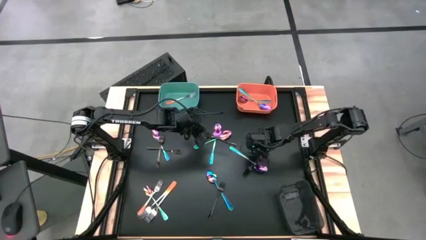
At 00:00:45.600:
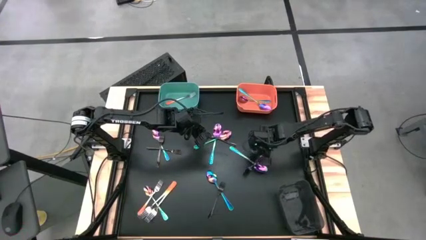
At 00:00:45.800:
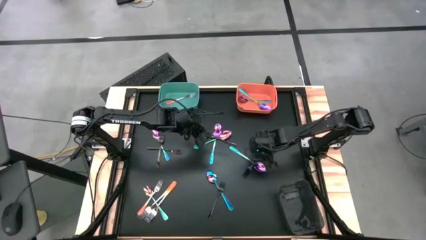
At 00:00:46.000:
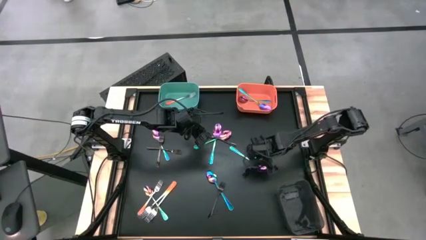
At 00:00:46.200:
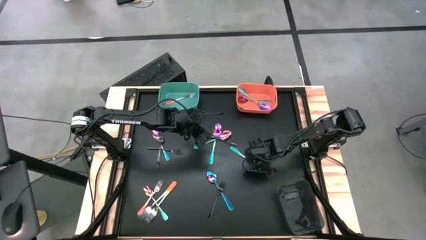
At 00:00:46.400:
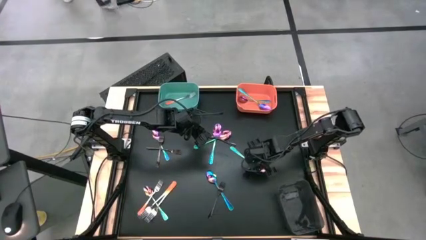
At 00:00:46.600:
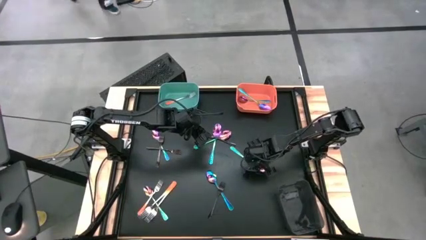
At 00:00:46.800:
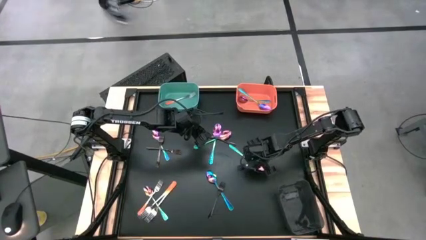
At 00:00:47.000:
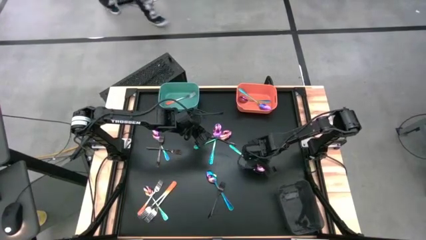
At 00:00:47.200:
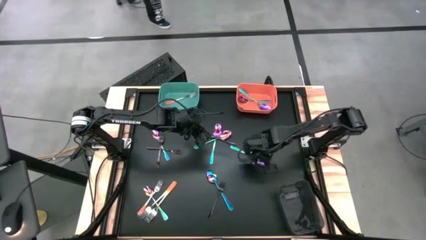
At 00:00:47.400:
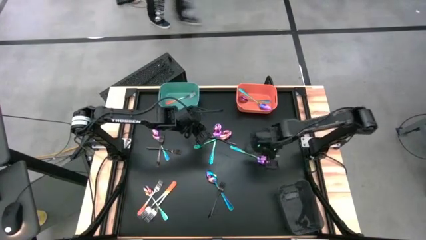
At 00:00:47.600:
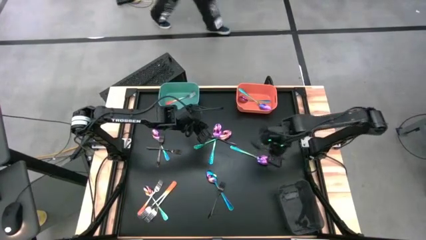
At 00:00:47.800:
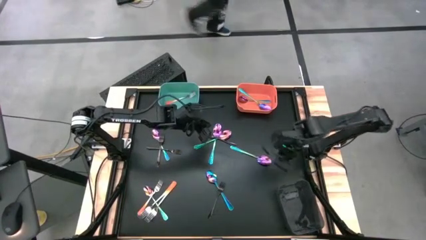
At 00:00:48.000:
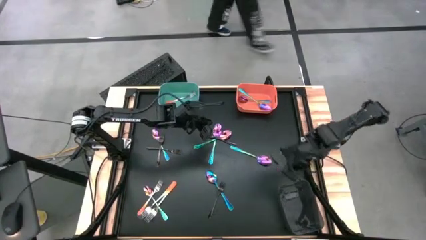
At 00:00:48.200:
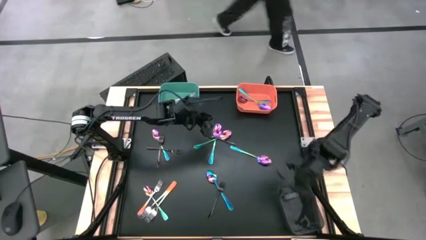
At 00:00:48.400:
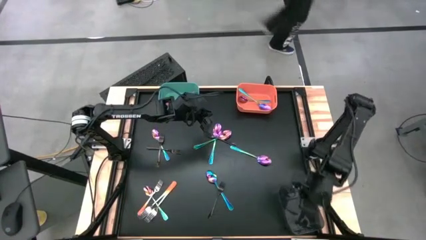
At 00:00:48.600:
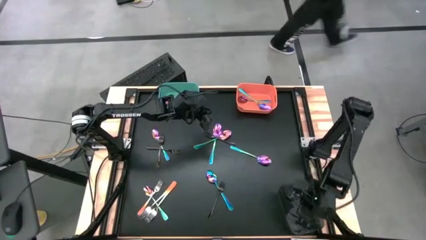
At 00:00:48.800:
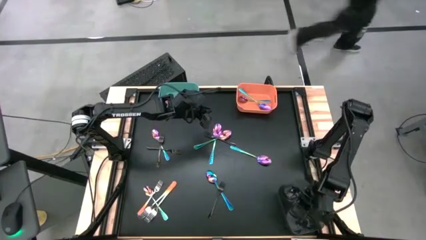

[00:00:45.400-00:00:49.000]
Task: Sort silverware by color (type)
Put the black fork into the black bin

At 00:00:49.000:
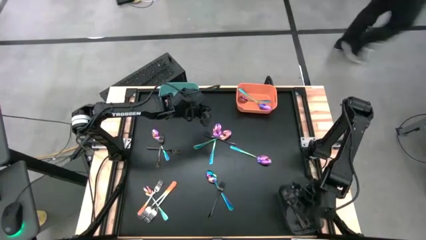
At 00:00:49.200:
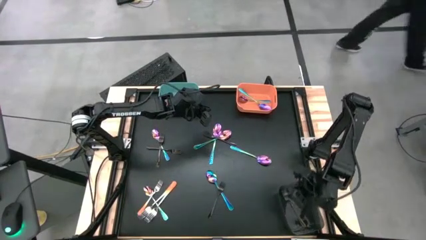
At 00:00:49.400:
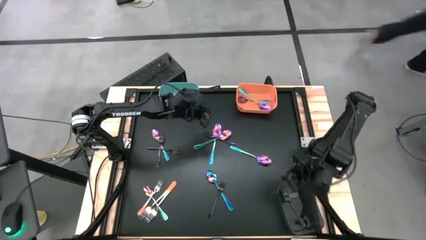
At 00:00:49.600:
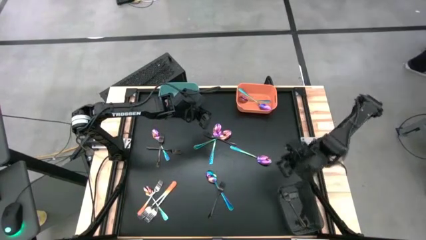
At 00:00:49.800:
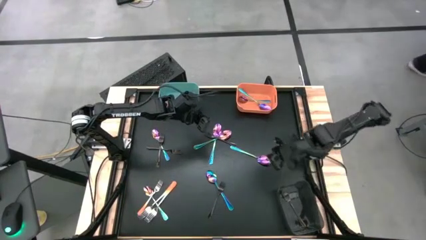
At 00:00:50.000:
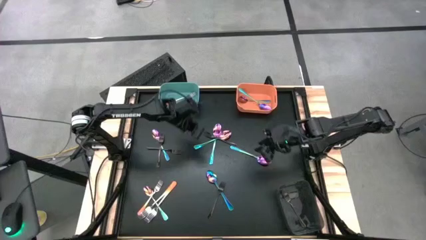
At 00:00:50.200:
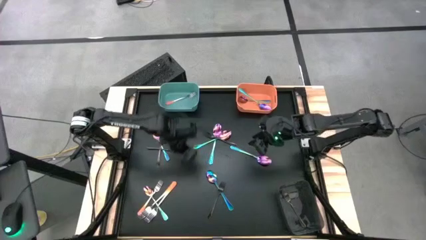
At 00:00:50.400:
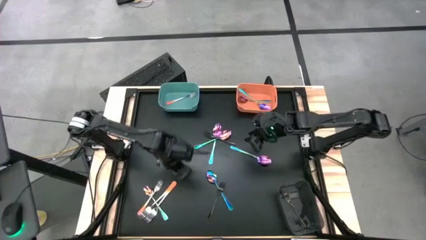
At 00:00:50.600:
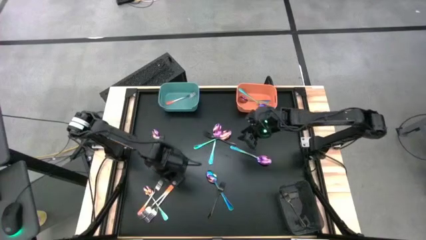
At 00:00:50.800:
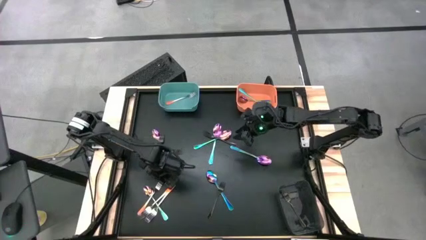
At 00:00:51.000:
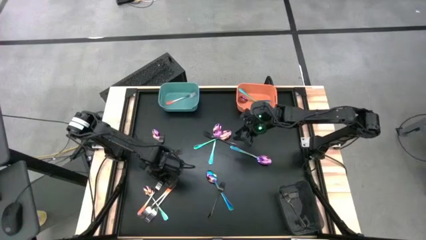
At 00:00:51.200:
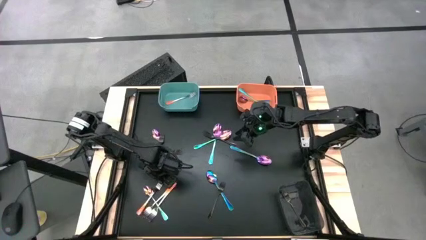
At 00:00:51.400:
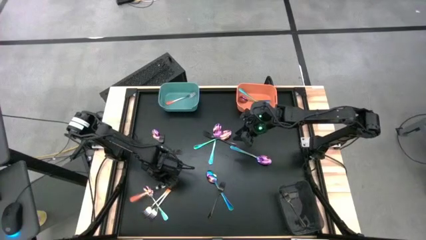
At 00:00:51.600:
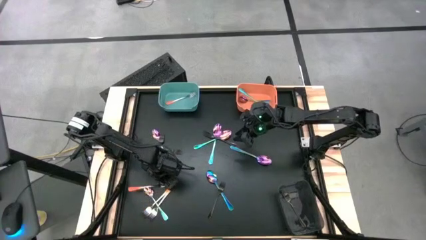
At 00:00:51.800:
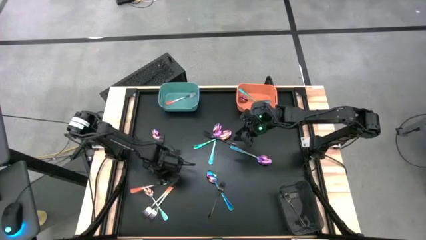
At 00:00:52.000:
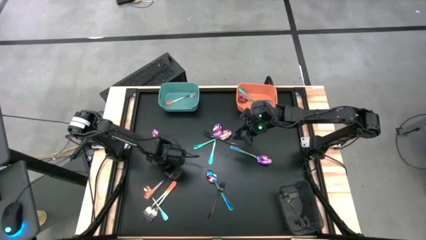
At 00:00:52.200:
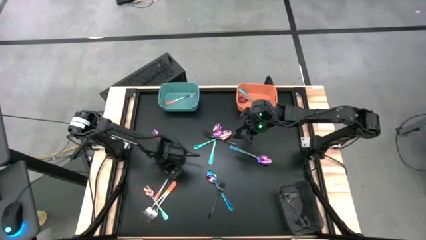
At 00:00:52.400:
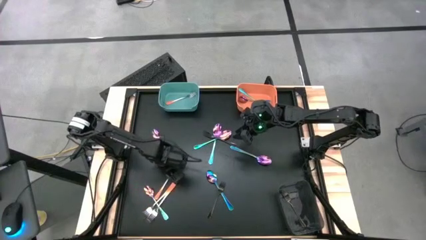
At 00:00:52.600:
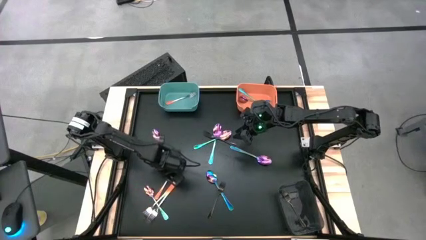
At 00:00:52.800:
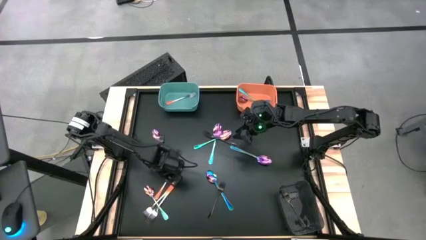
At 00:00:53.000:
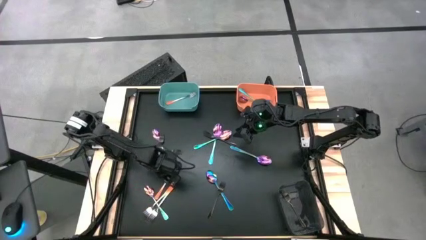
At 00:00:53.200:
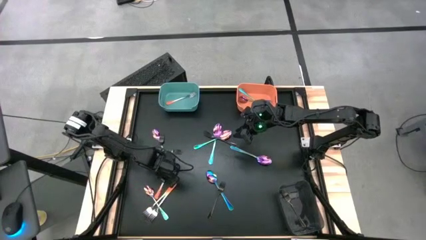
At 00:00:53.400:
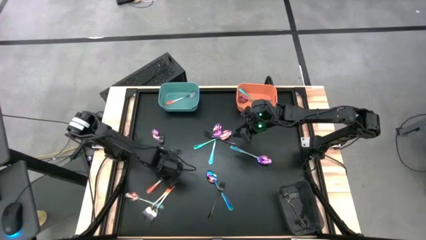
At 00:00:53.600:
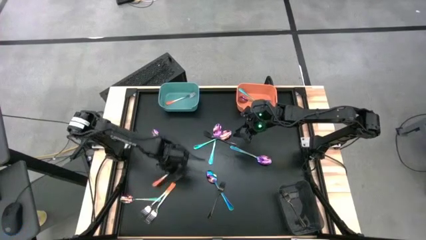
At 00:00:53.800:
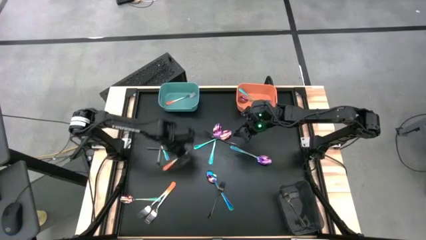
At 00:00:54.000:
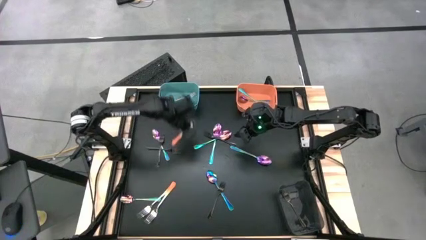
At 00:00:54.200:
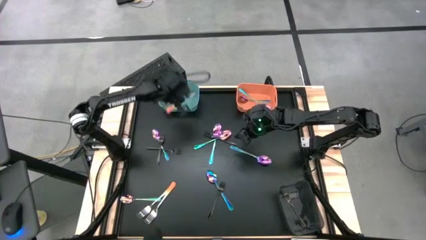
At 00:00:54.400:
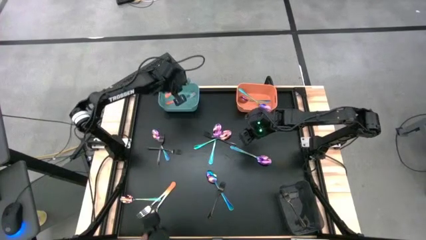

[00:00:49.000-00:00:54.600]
Put the orange fork into the green bin

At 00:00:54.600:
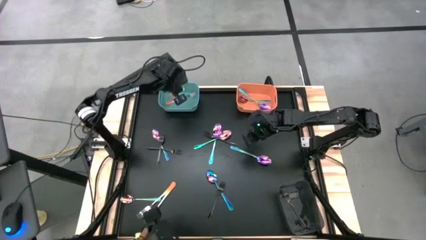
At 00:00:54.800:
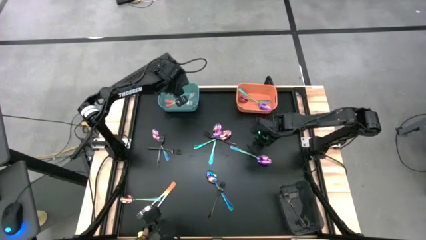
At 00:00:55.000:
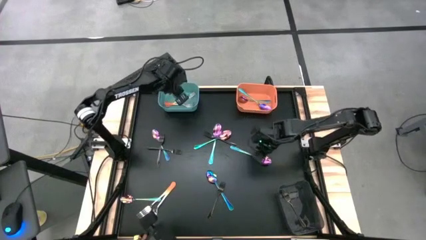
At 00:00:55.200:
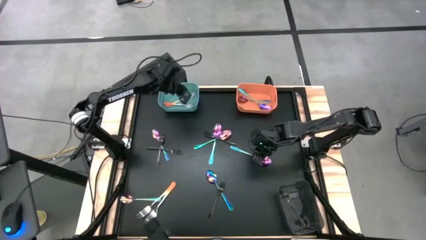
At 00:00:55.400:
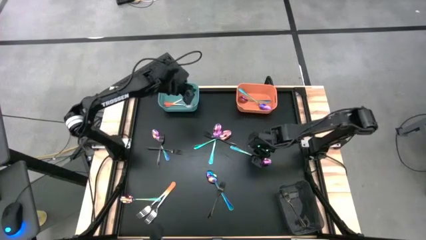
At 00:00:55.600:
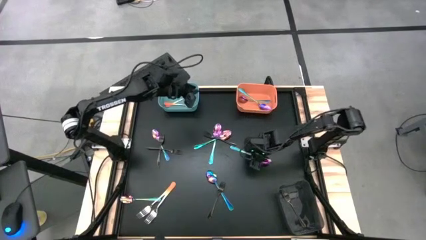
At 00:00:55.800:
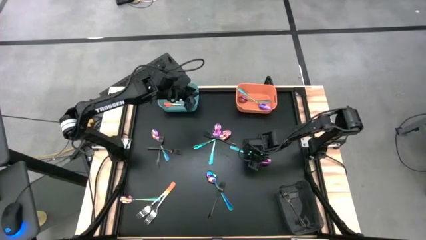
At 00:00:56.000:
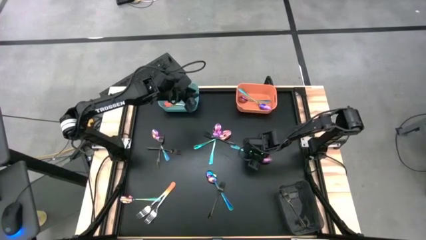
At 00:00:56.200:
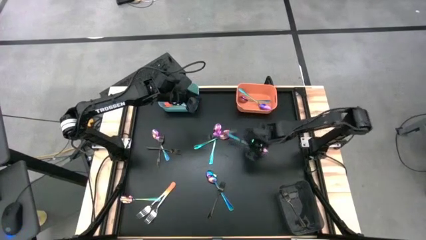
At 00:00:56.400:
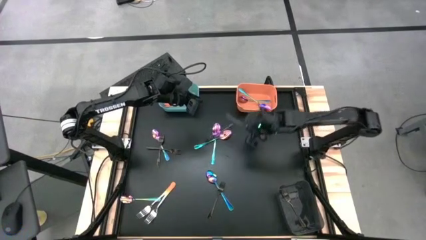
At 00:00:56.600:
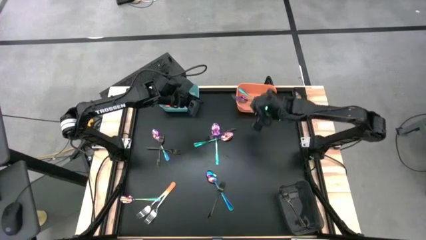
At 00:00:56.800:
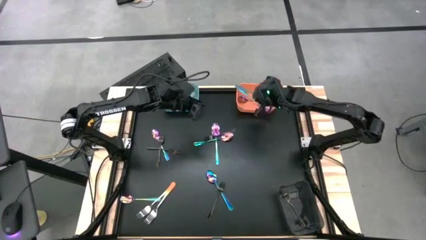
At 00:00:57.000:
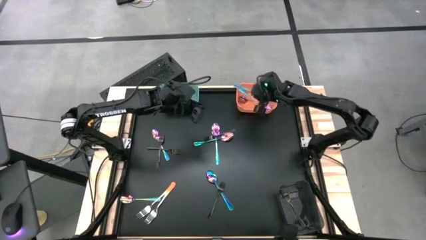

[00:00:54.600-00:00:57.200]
Put the purple spoon into the orange bin

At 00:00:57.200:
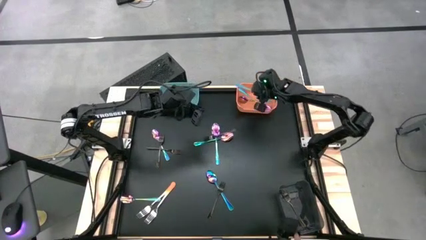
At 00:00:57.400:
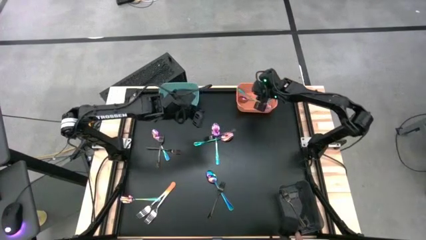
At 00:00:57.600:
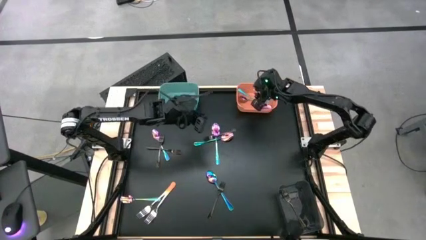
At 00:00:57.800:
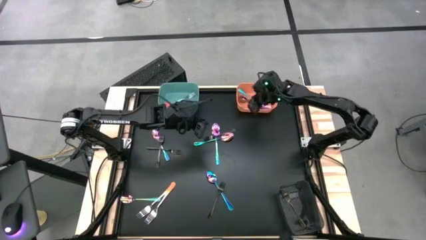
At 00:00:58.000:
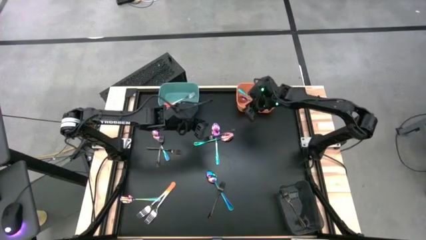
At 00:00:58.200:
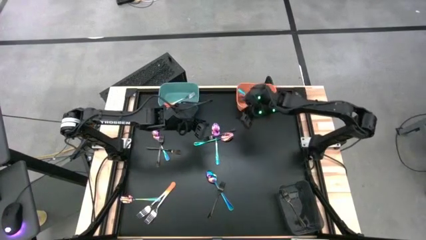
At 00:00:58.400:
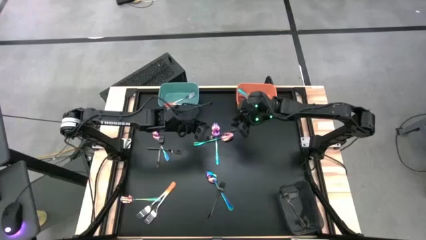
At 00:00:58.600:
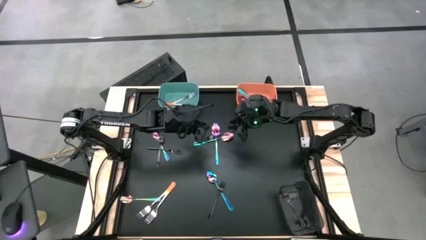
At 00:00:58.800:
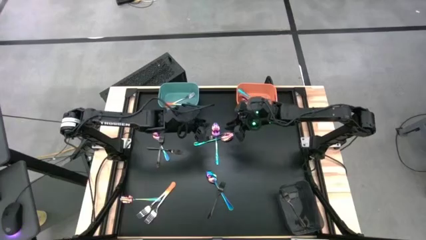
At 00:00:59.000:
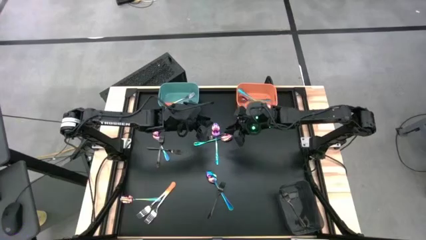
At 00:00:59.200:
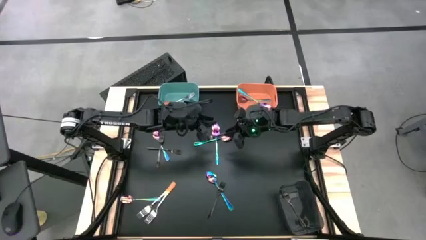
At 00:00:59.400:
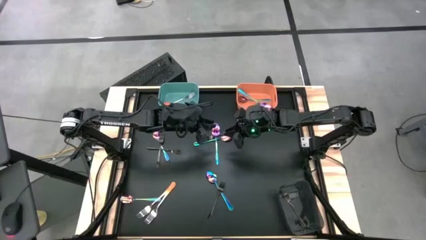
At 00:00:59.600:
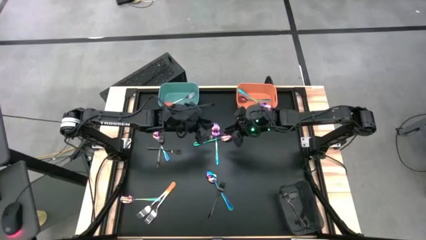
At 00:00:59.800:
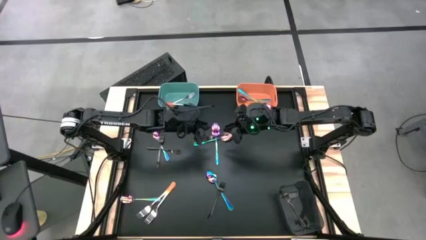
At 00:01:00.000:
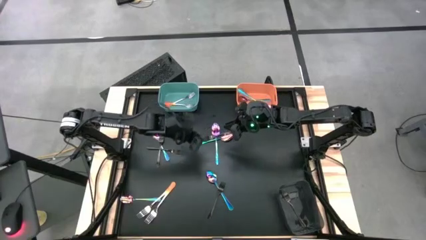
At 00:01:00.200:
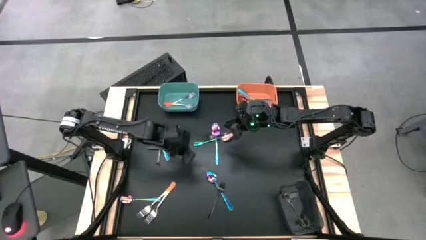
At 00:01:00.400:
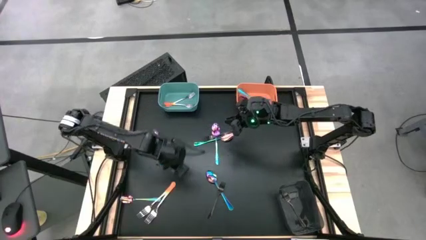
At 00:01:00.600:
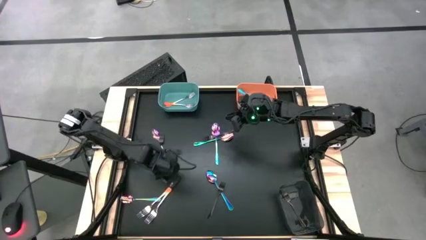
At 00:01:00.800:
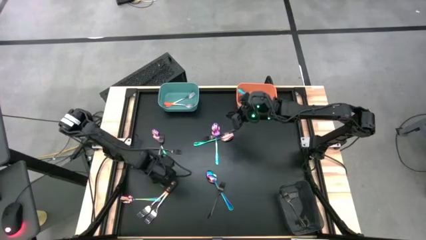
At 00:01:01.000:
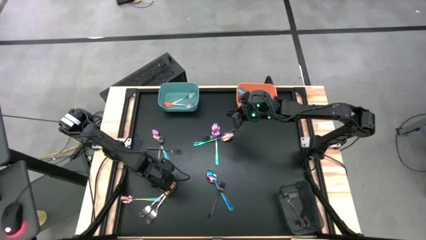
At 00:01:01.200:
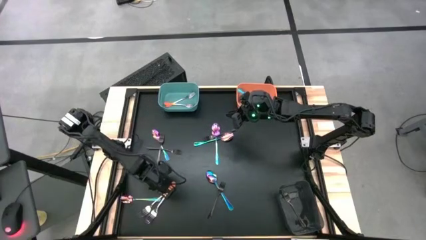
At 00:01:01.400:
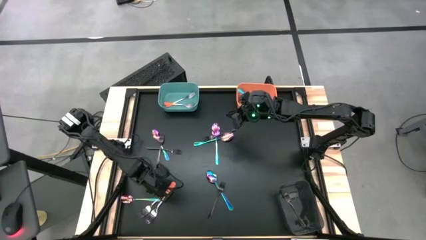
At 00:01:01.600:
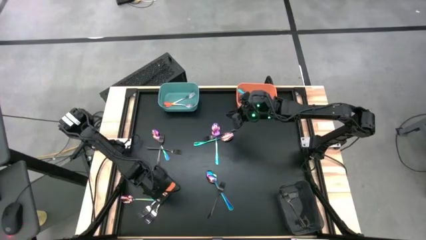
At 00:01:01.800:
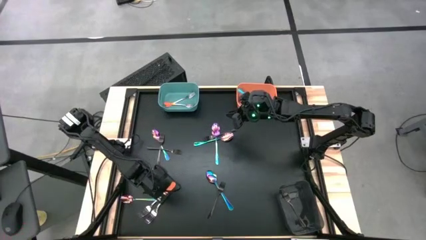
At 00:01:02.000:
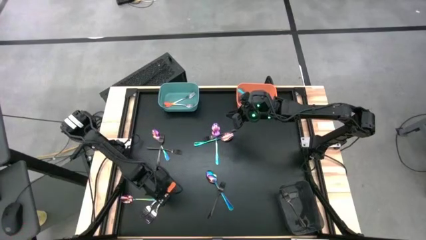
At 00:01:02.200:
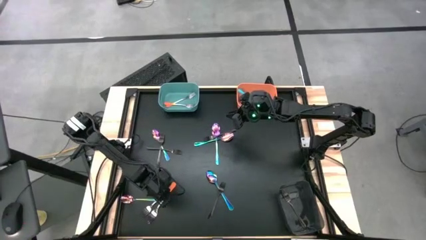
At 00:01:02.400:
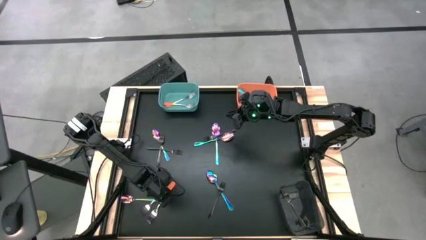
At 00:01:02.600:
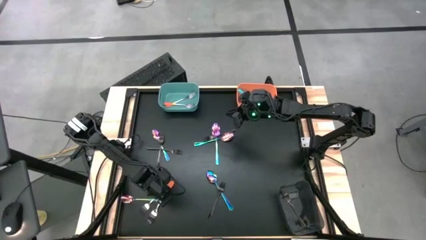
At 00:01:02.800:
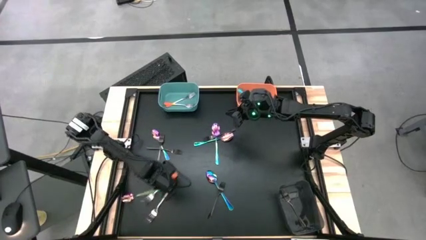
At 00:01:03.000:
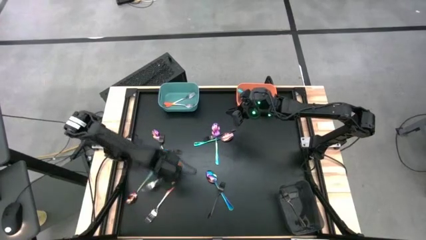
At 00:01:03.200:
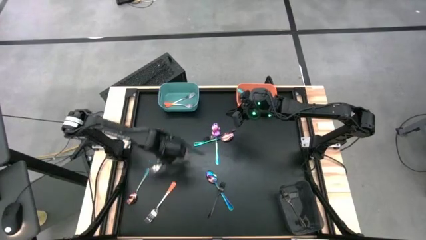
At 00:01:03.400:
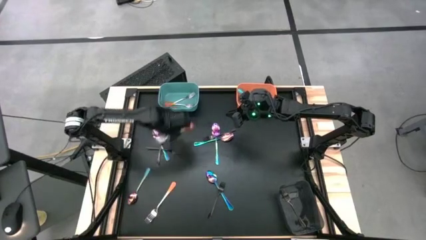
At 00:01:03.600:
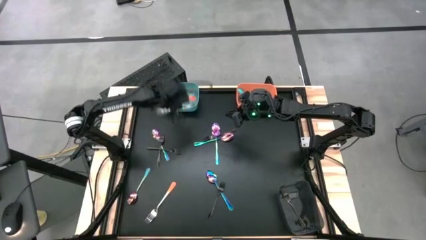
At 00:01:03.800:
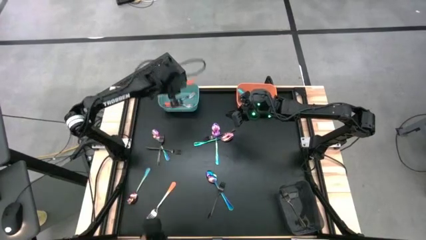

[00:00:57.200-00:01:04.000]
Put the orange fork into the green bin
